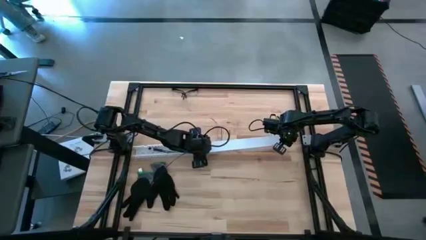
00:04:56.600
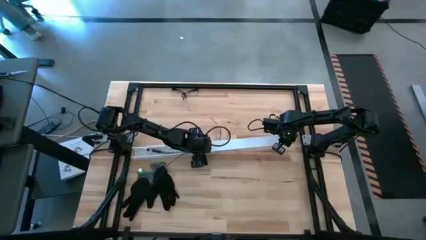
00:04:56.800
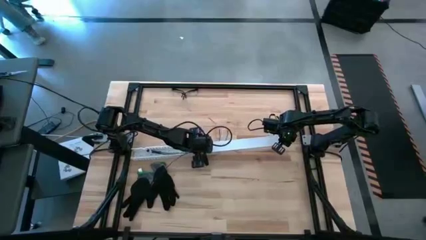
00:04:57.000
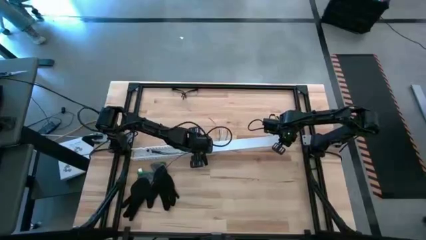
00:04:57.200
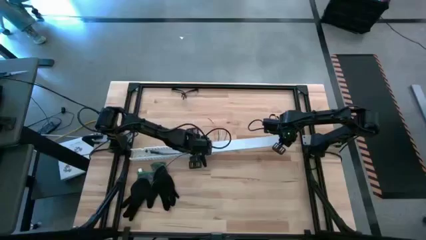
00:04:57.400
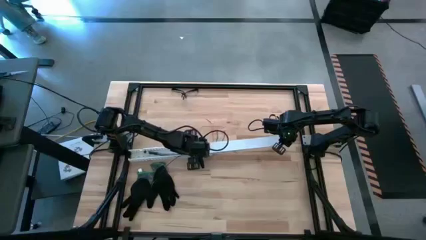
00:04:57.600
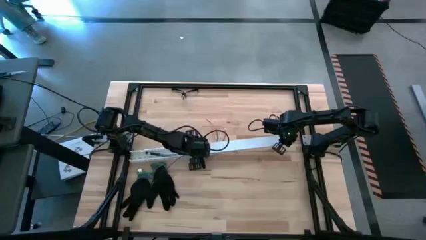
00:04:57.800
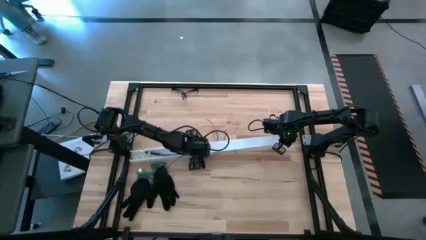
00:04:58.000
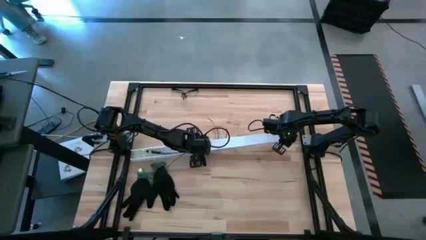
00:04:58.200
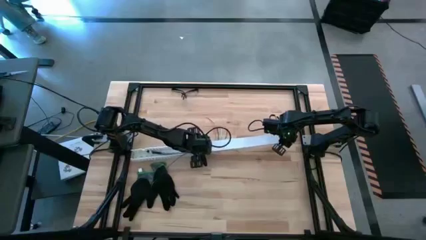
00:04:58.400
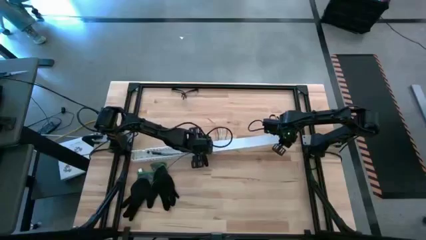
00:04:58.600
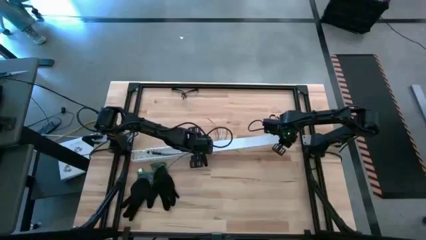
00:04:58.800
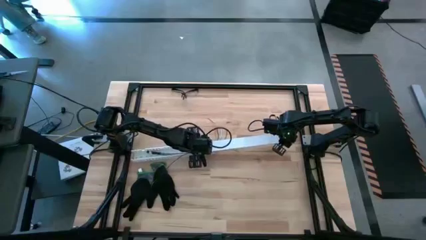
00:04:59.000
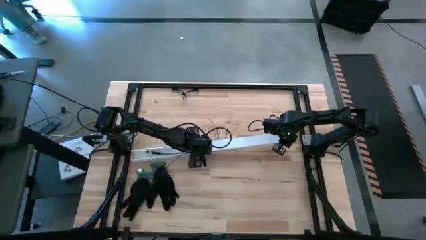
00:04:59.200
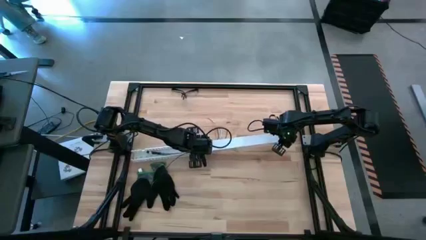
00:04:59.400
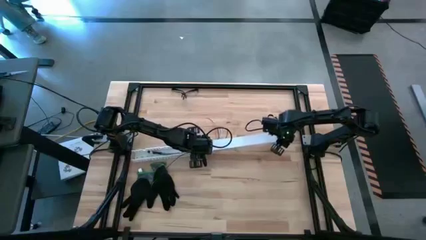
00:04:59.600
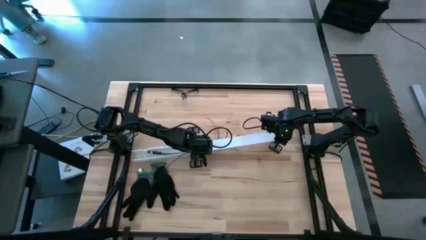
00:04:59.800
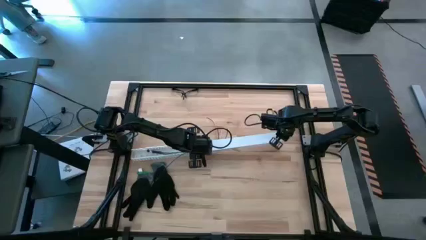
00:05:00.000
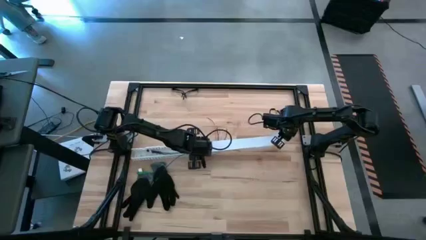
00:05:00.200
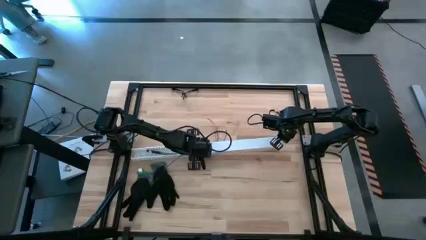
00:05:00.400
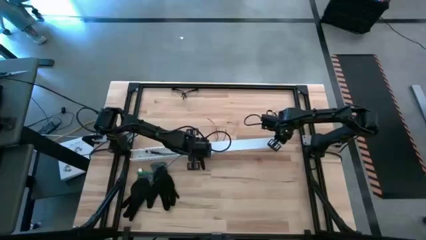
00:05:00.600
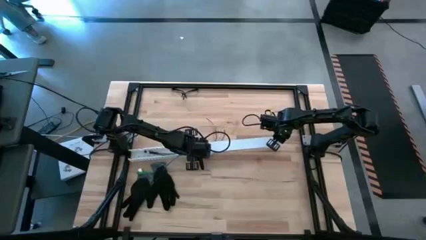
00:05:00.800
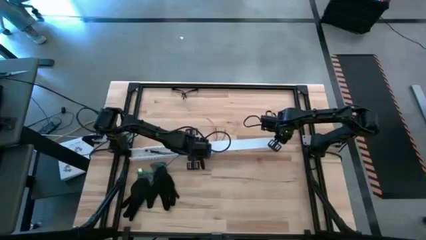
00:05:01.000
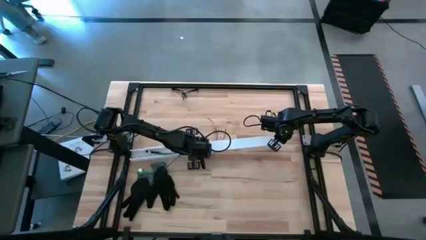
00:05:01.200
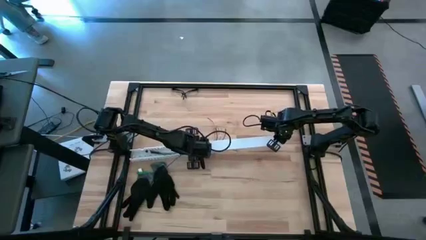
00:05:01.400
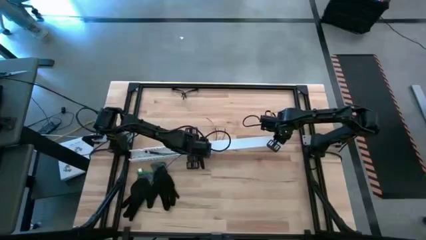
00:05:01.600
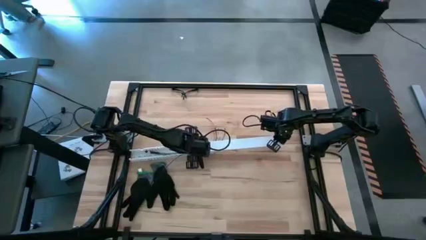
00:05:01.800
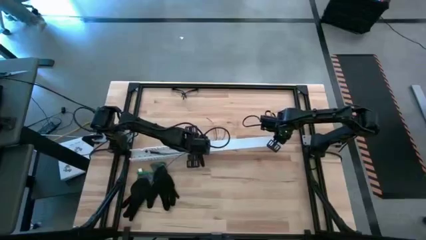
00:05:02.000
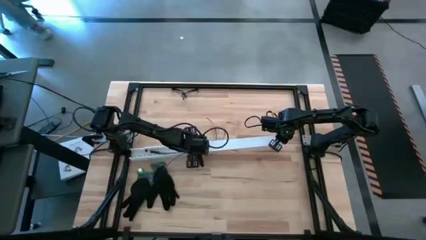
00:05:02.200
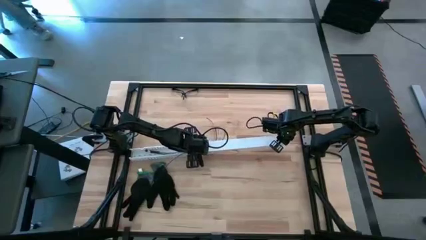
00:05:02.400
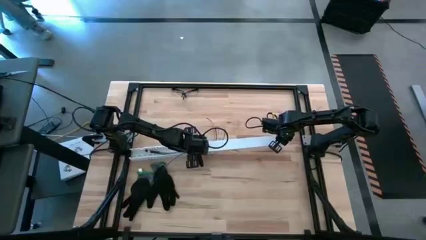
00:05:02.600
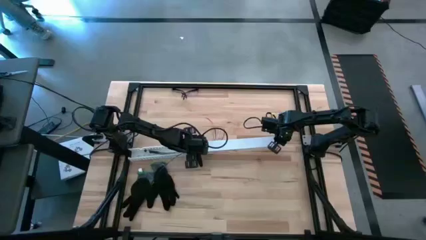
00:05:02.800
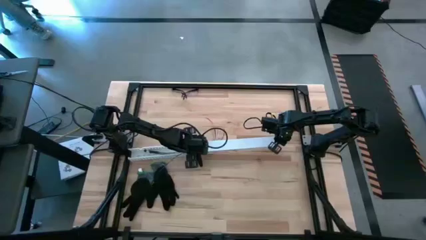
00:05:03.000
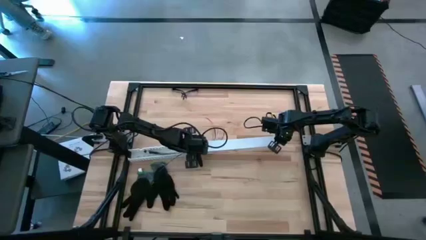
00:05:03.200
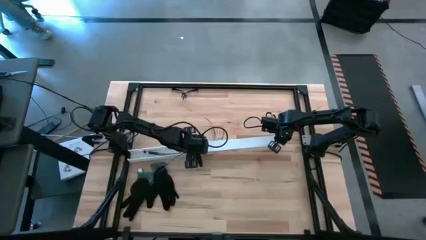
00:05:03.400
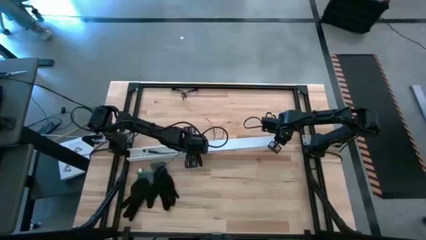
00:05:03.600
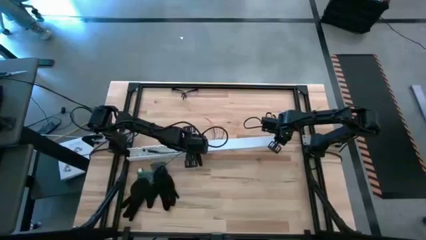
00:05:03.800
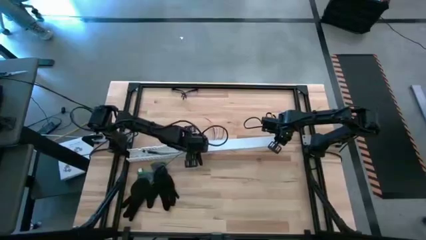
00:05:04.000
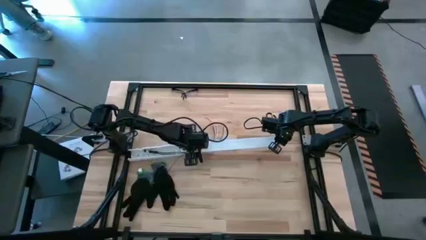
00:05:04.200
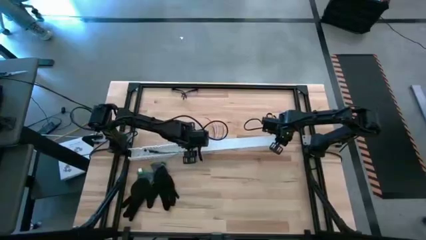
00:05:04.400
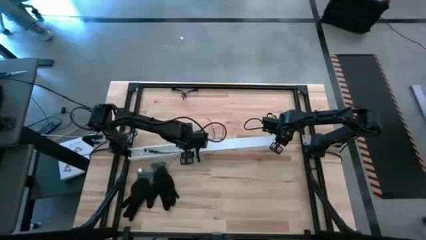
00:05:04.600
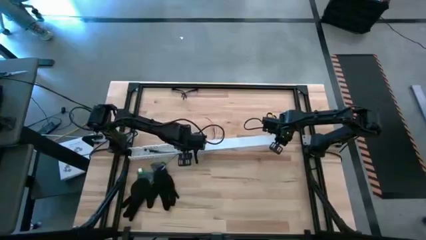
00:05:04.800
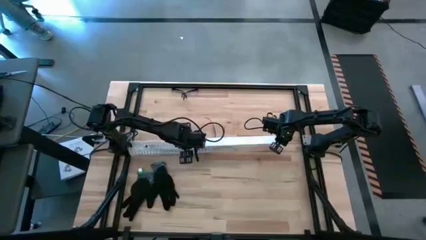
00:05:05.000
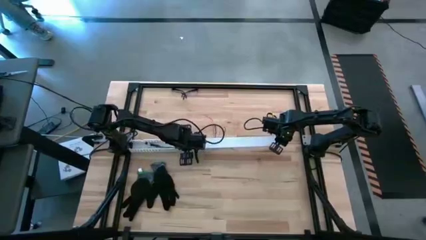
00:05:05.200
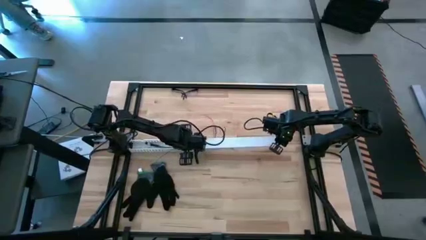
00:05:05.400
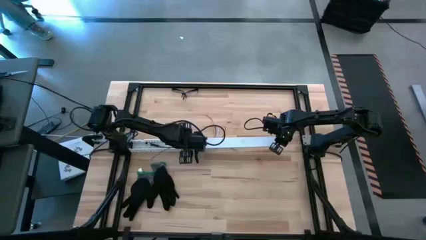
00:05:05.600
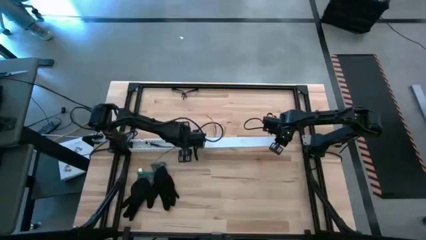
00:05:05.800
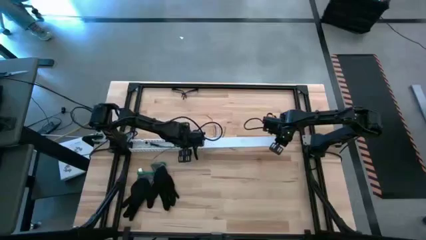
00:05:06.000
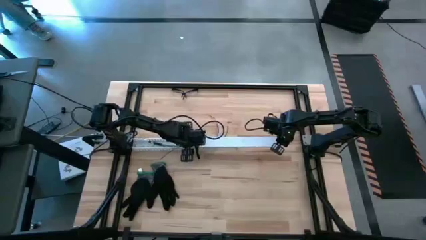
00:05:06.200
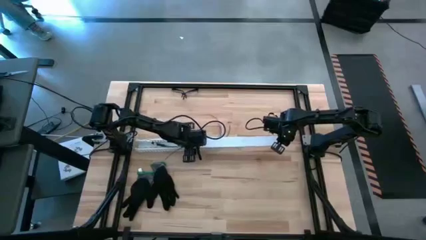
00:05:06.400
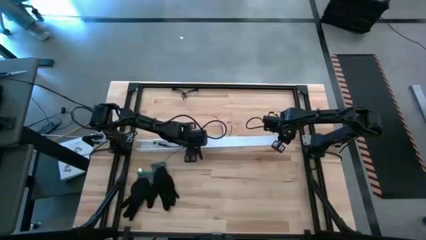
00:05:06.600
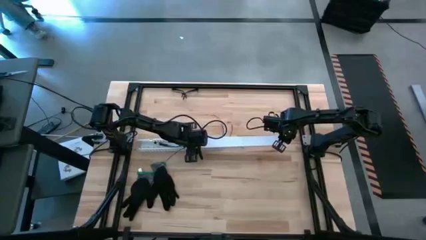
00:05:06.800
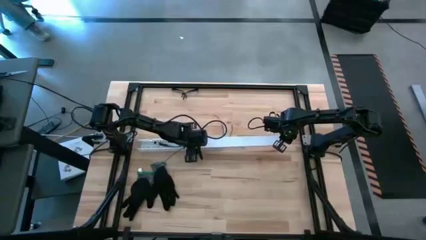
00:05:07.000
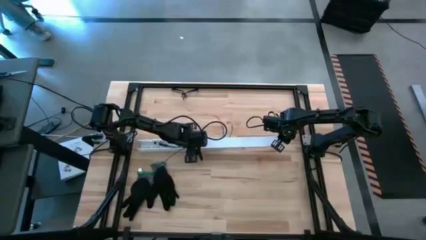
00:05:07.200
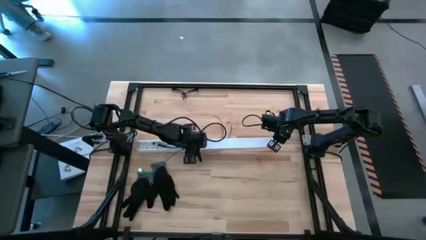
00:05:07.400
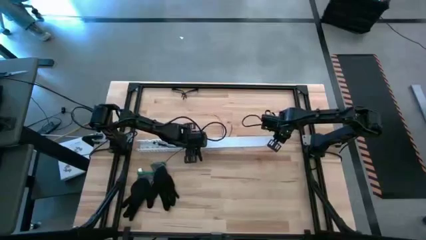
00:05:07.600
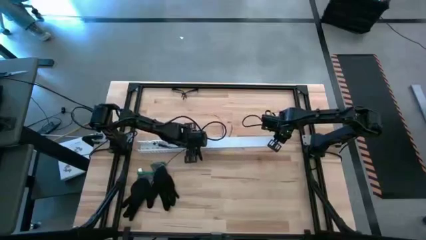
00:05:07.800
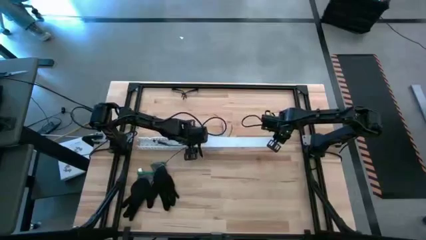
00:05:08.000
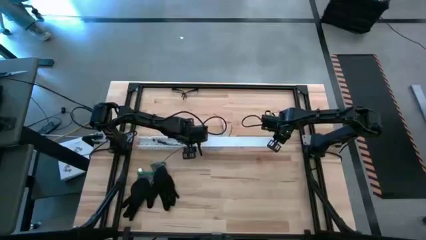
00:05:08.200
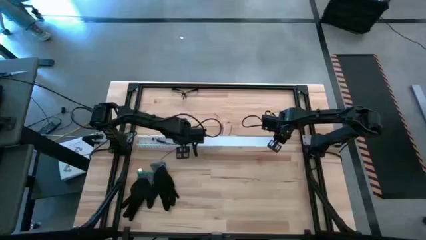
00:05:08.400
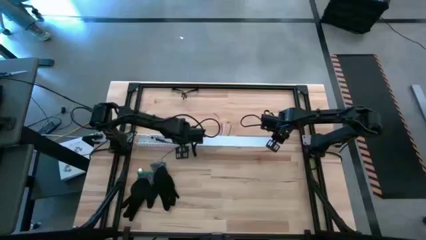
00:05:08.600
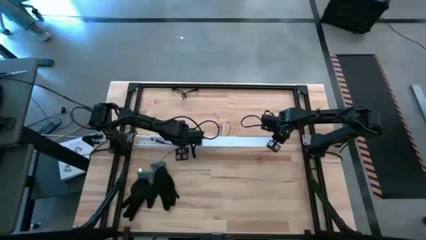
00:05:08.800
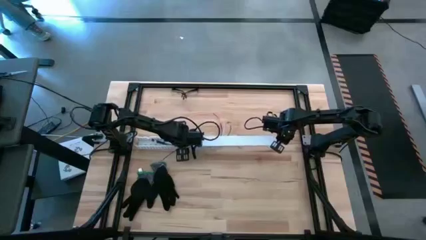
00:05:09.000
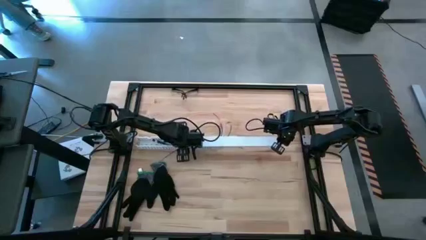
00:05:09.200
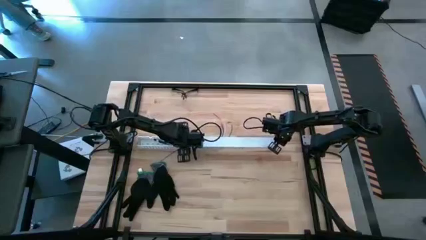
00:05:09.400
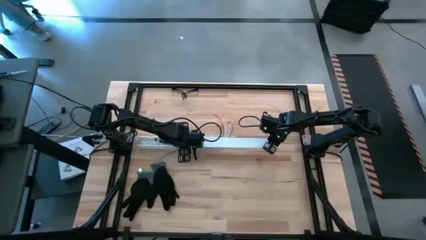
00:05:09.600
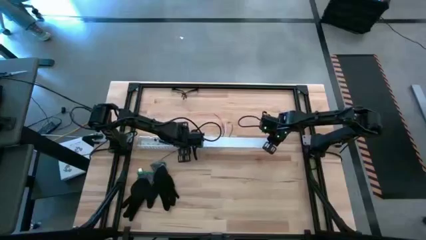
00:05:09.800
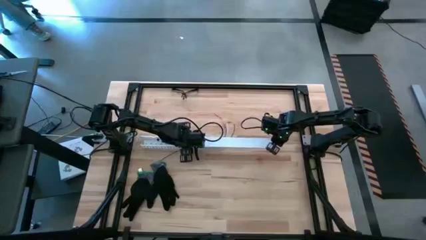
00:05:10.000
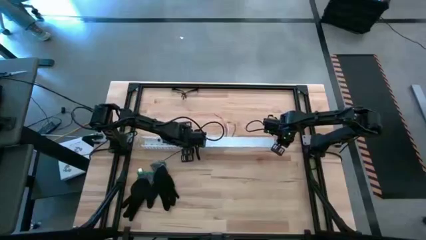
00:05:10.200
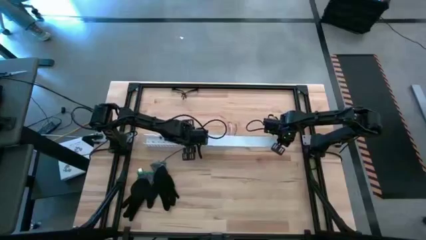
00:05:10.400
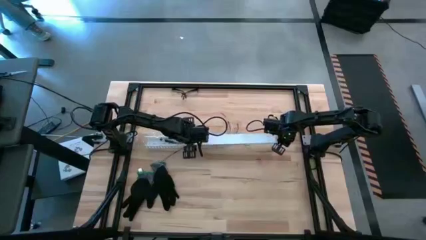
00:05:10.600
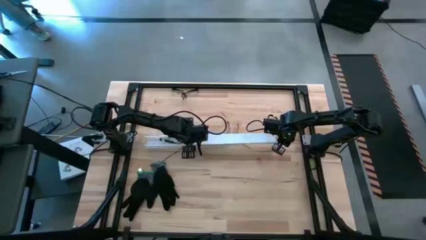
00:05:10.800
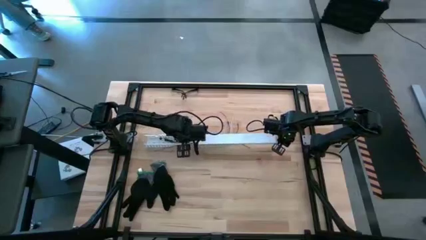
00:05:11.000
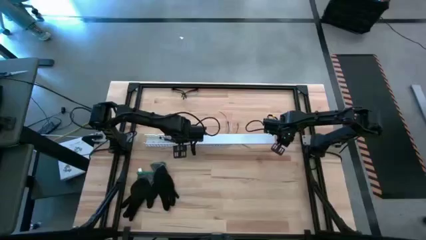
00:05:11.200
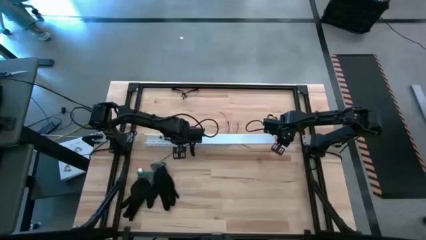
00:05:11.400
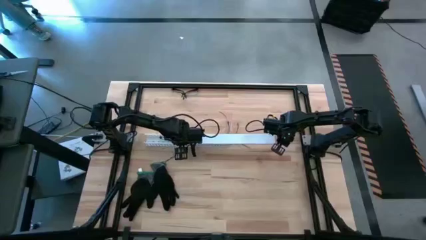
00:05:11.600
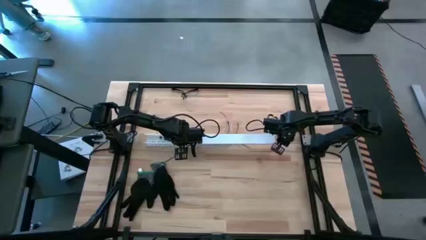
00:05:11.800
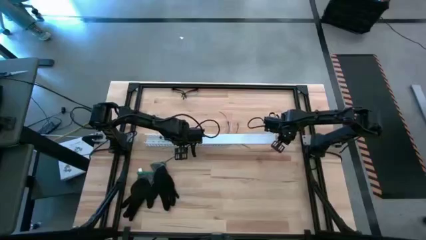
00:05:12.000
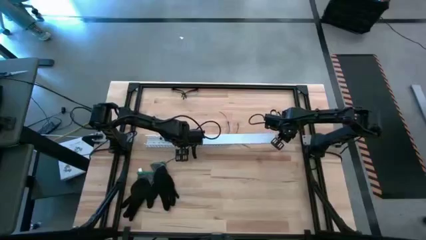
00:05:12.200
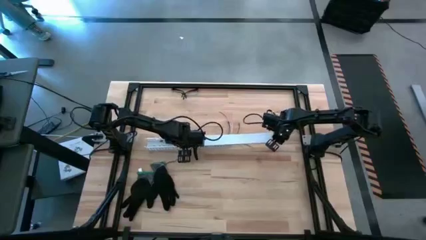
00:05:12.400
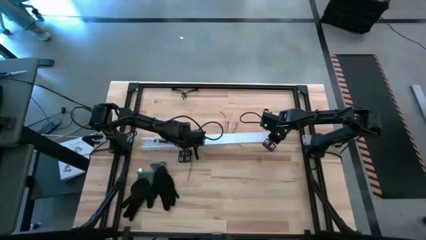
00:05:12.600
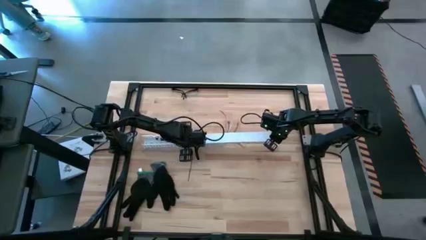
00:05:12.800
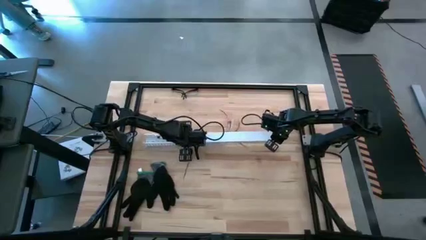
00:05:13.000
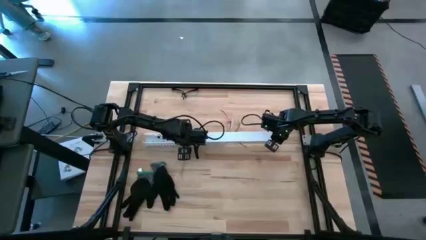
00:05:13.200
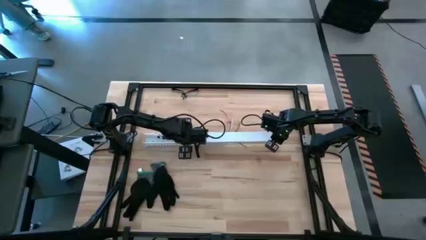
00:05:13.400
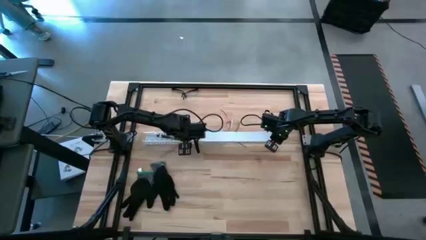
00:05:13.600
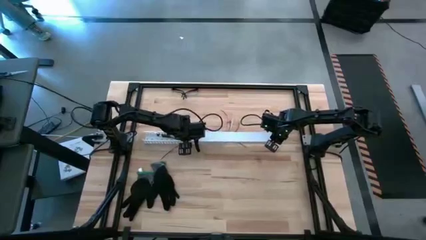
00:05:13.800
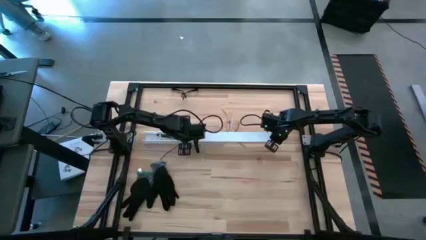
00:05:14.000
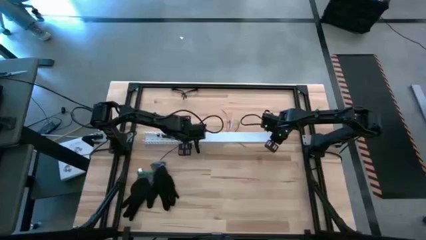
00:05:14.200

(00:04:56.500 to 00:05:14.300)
Task: Ziptie cables
Close the white cable duct
